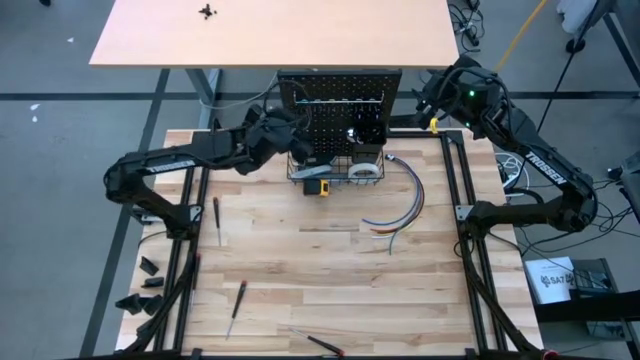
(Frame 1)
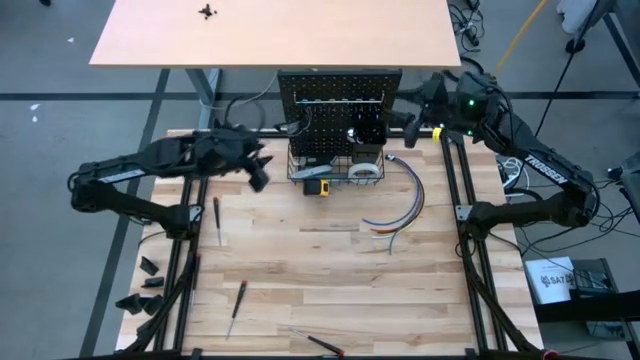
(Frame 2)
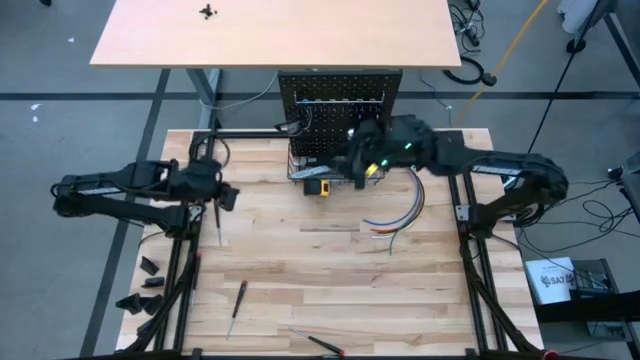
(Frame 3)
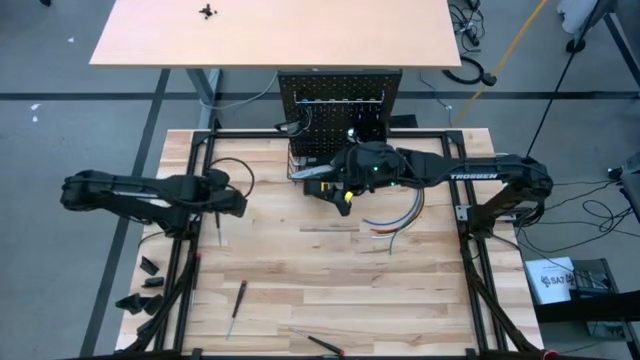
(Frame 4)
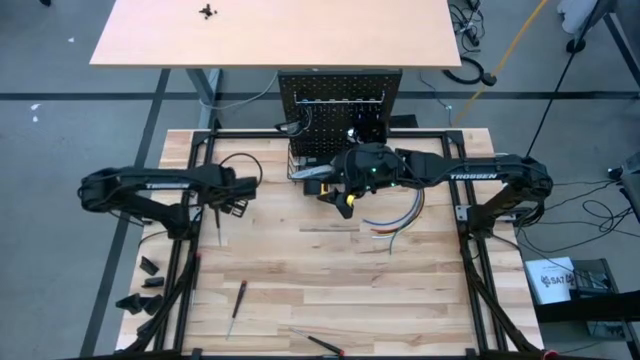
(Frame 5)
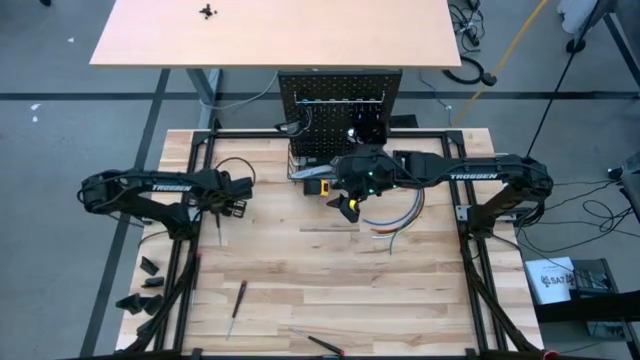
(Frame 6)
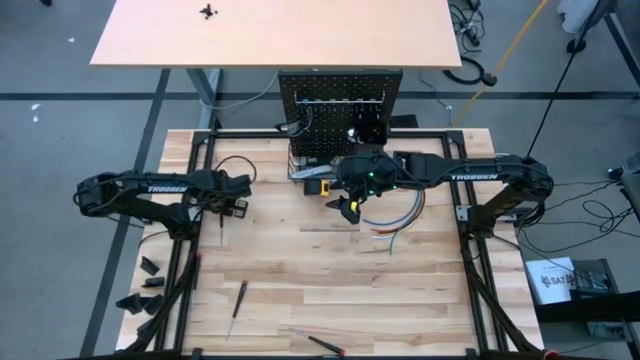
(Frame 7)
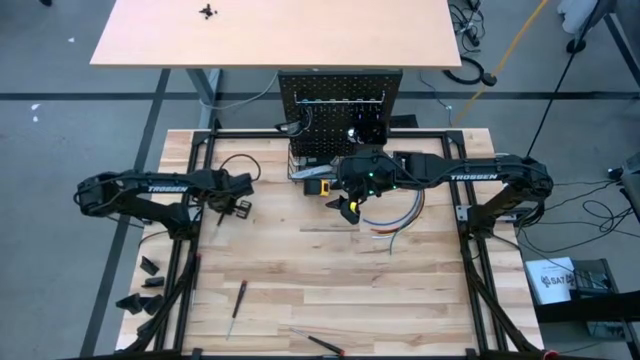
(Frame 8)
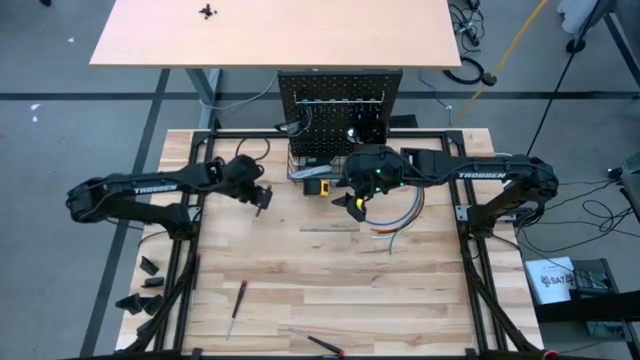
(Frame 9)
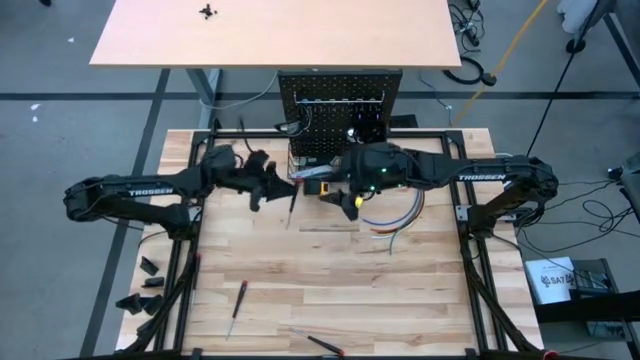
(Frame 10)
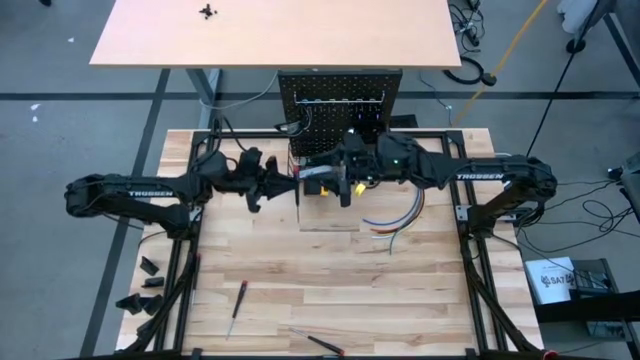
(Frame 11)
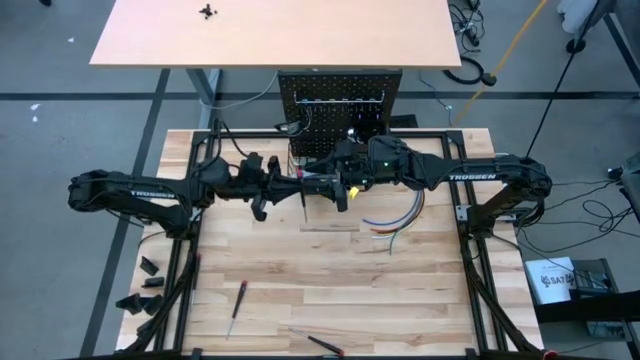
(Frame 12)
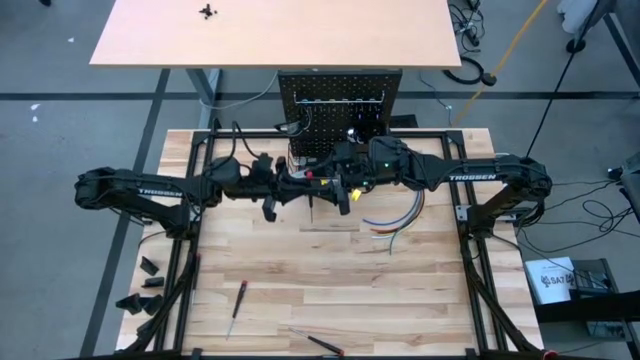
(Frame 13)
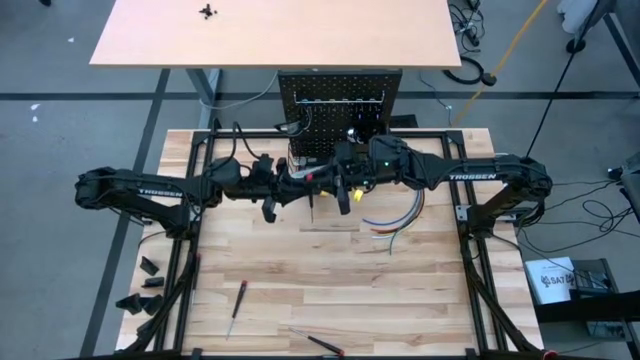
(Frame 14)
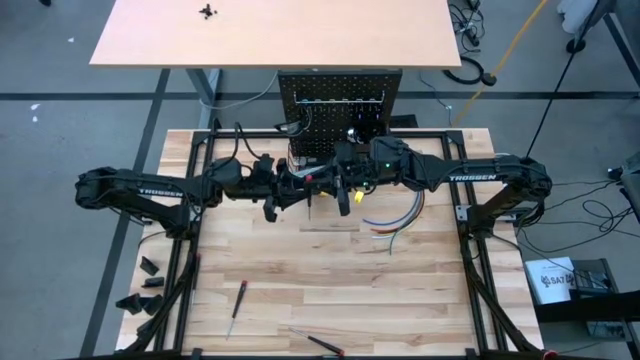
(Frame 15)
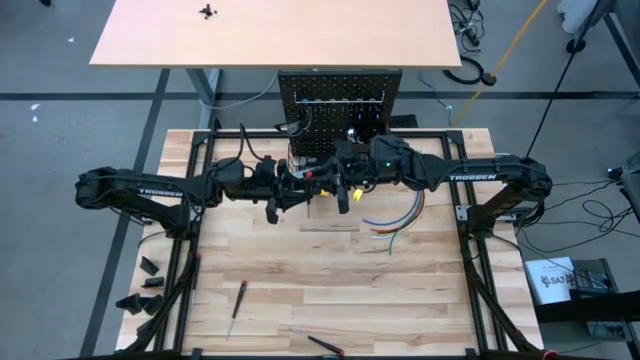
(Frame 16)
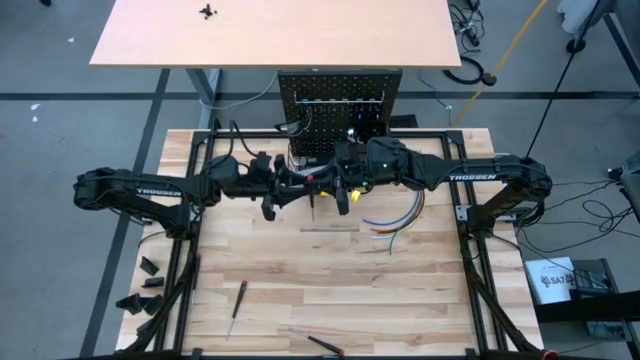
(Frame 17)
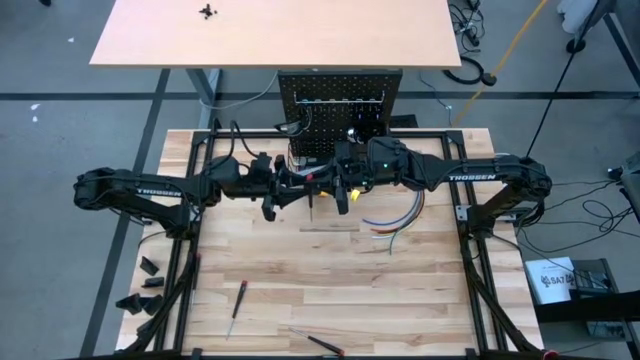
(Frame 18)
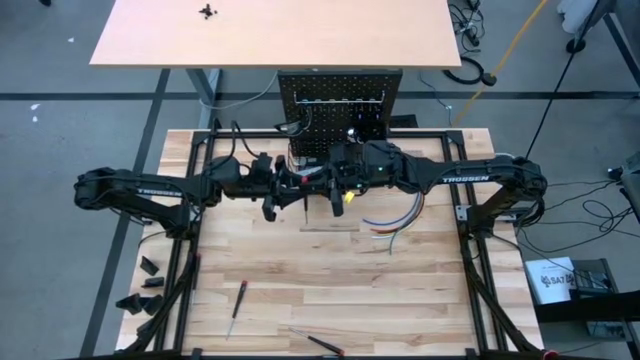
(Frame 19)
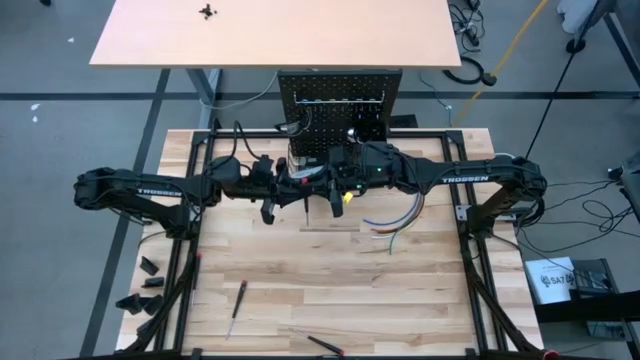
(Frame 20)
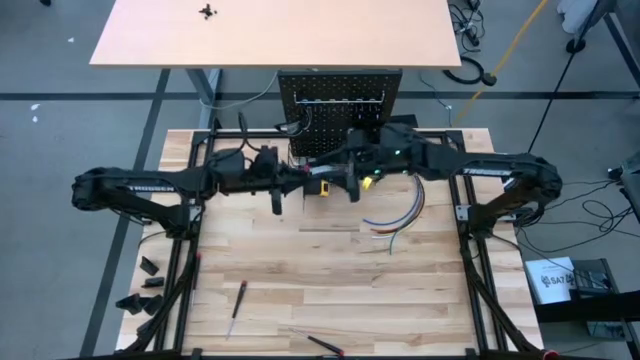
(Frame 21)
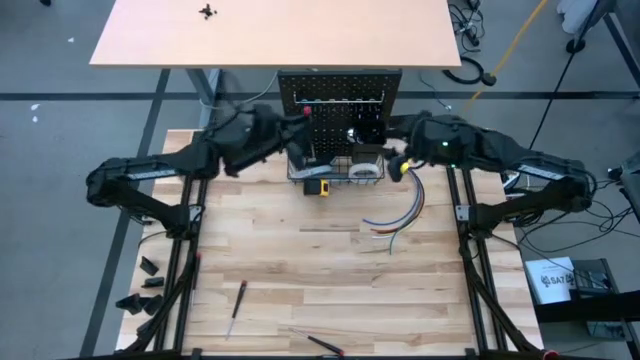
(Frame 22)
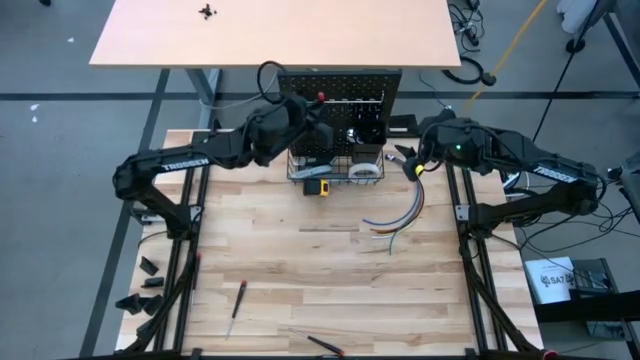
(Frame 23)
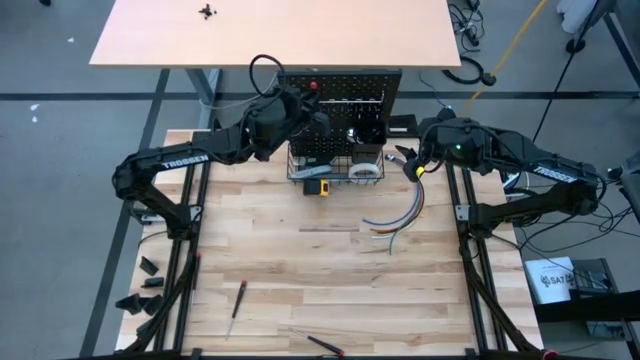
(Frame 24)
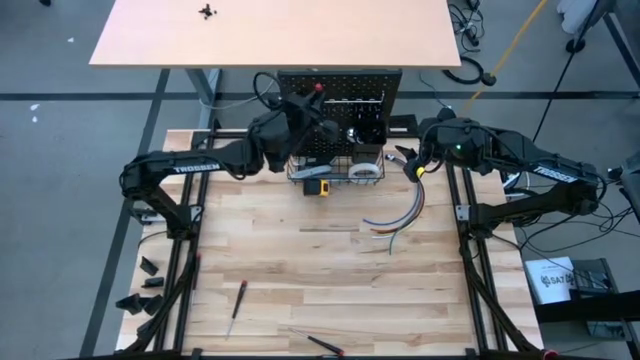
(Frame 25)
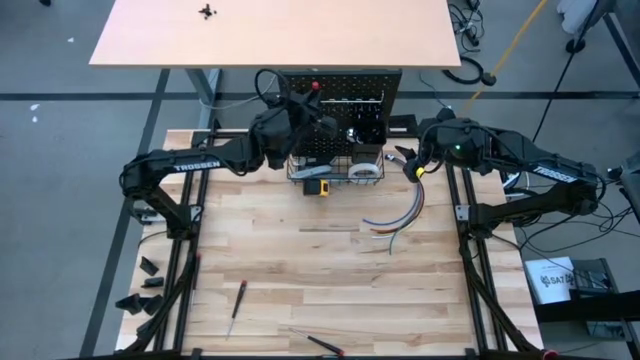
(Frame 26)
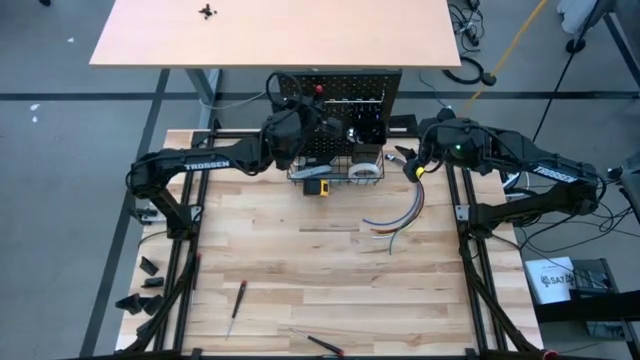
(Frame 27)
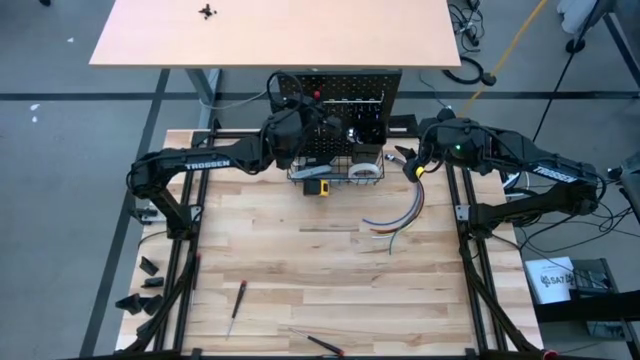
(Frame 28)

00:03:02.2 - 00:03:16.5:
Task: Hang tools onto peg board
Hang the screwdriver on the pegboard

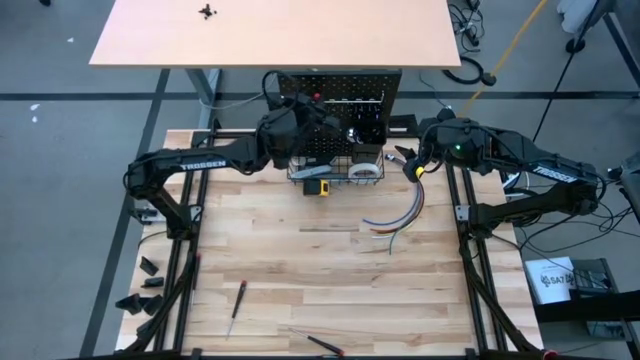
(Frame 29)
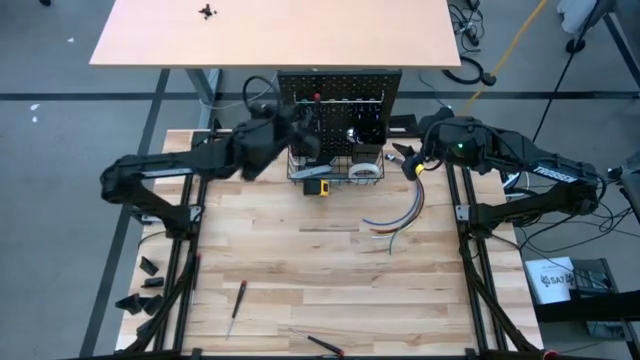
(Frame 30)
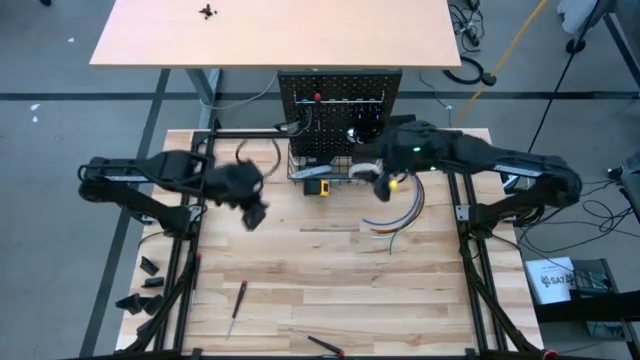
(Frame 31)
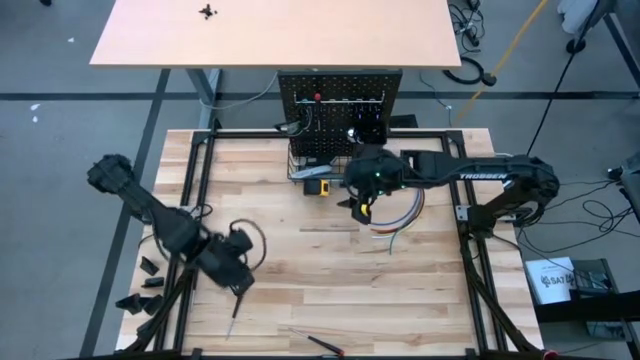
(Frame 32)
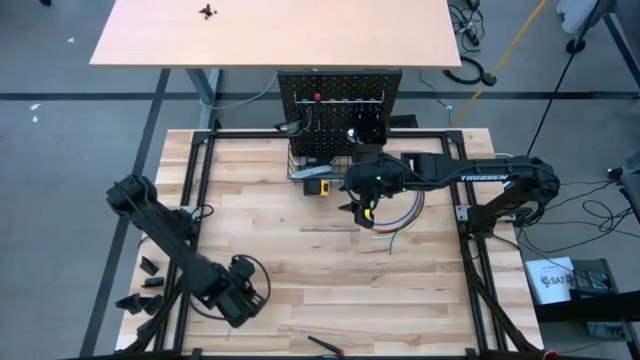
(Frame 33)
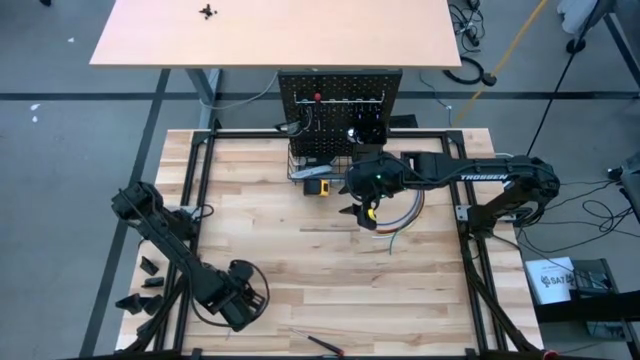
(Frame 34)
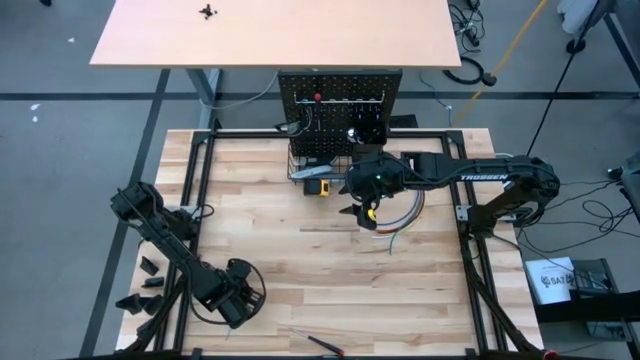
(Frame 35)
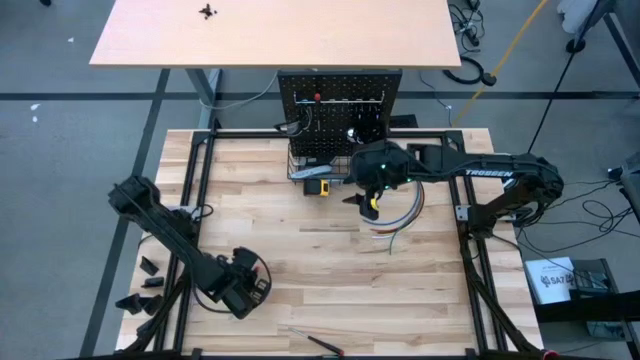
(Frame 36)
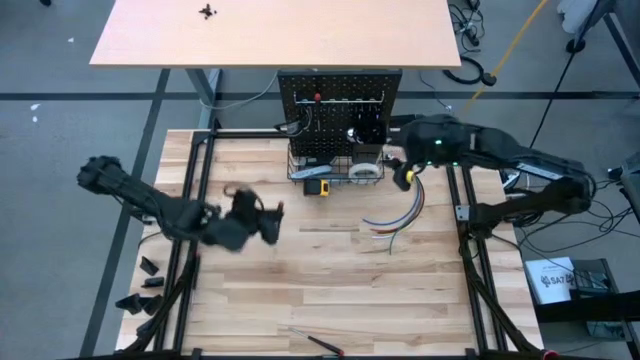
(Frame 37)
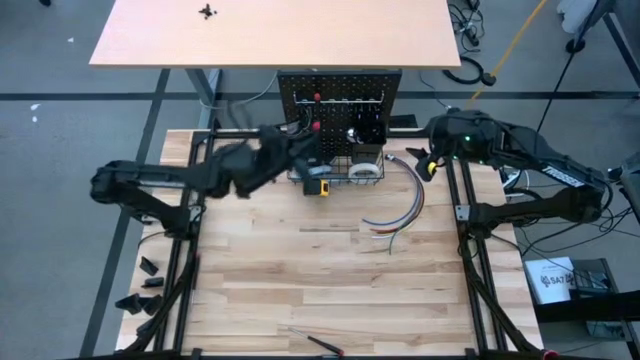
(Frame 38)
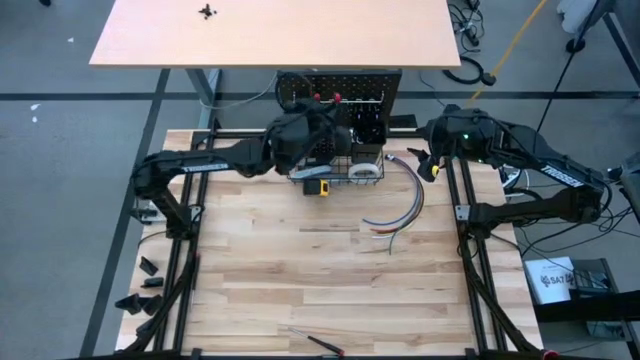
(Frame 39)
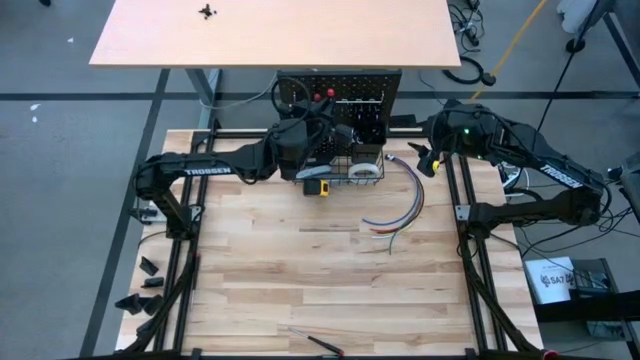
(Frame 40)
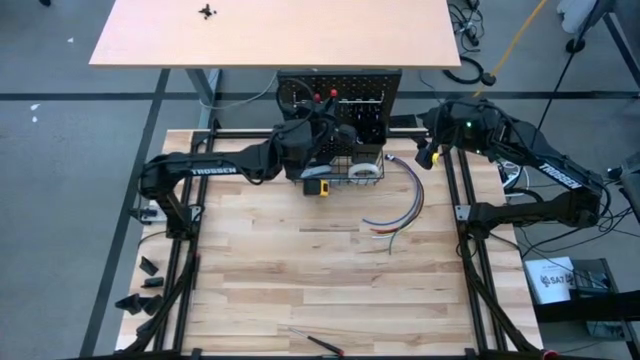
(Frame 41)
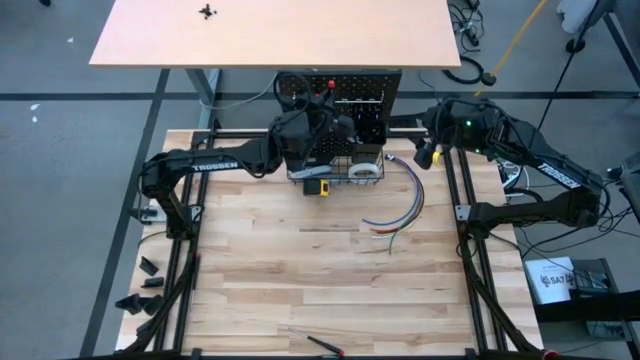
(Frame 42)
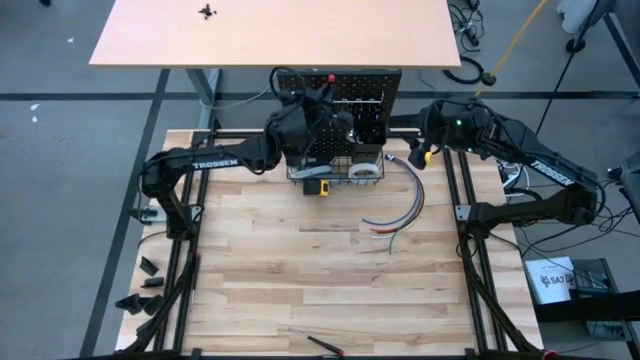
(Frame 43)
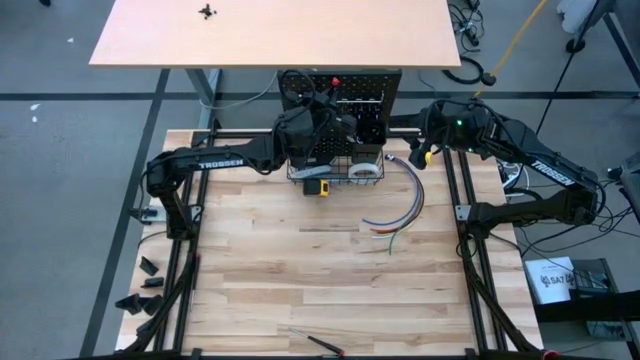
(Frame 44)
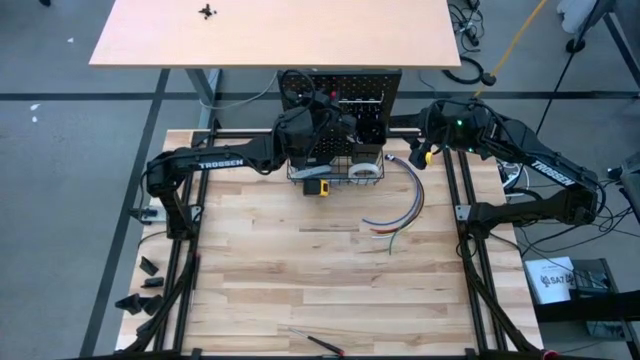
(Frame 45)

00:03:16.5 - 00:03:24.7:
Hang the screwdriver on the pegboard
